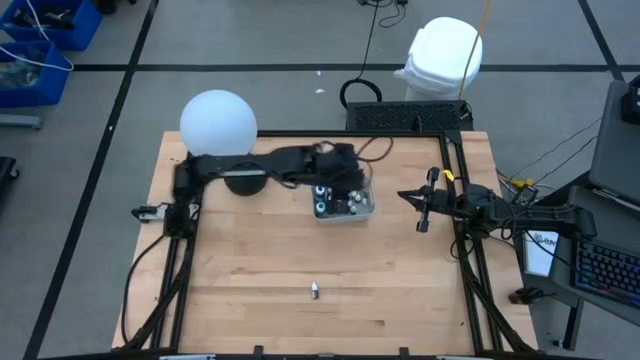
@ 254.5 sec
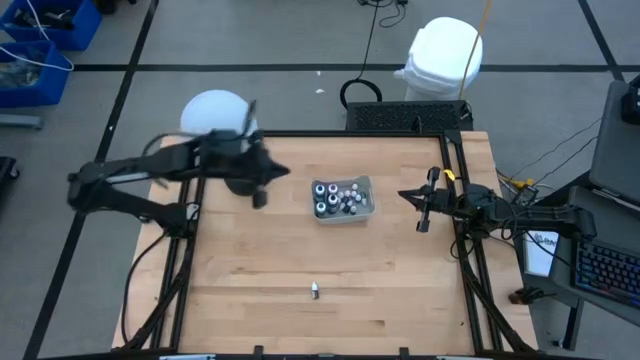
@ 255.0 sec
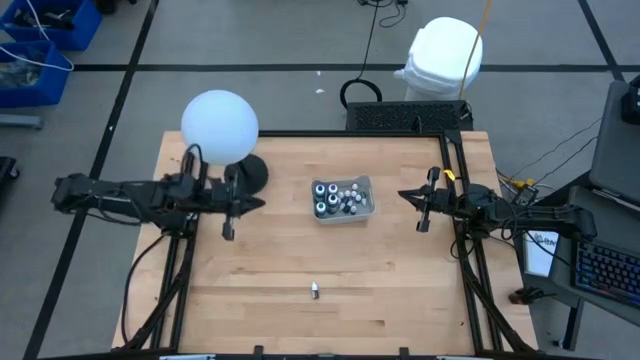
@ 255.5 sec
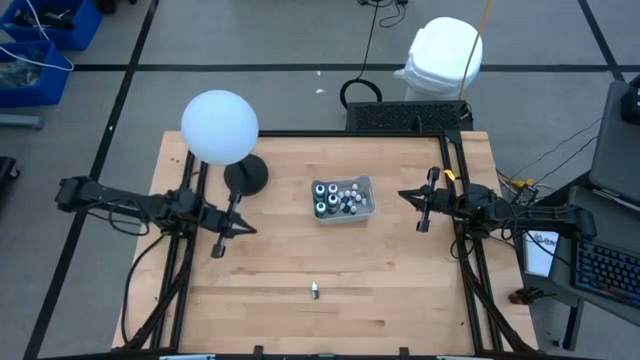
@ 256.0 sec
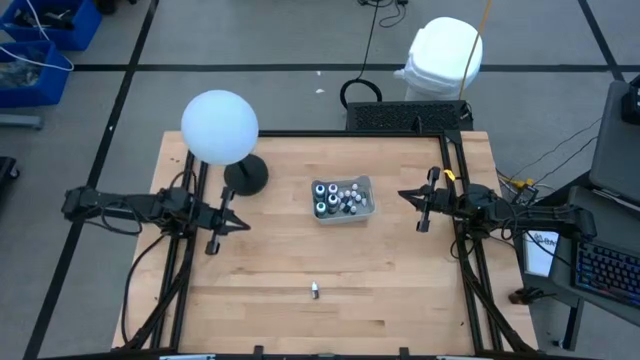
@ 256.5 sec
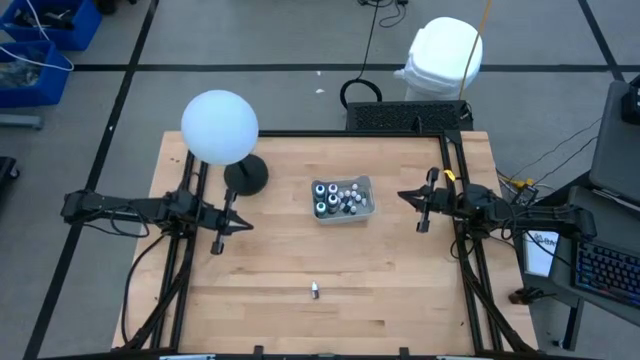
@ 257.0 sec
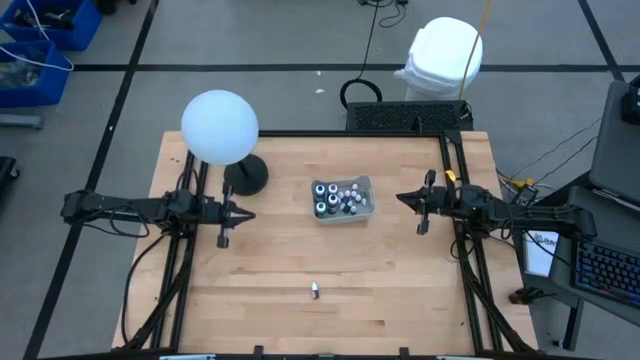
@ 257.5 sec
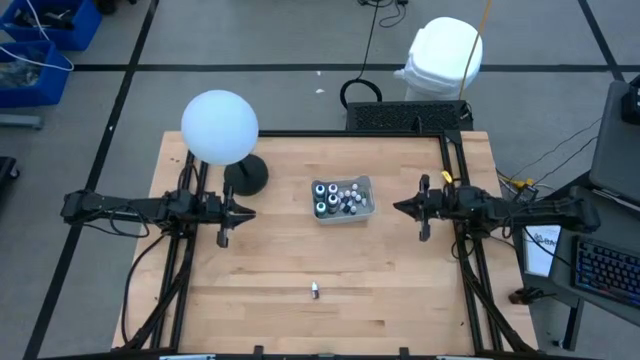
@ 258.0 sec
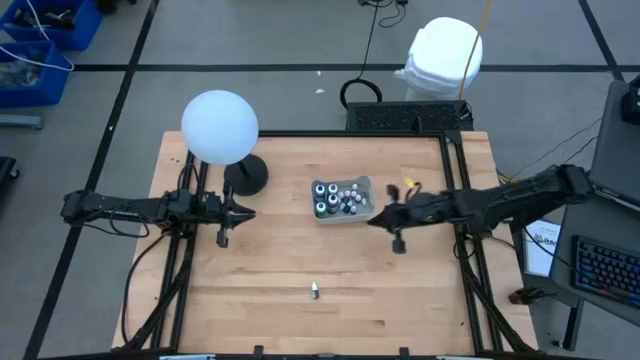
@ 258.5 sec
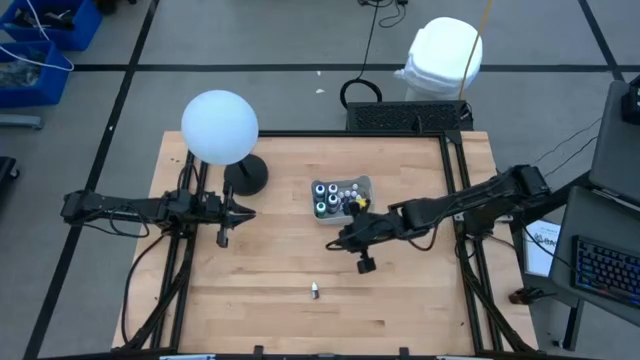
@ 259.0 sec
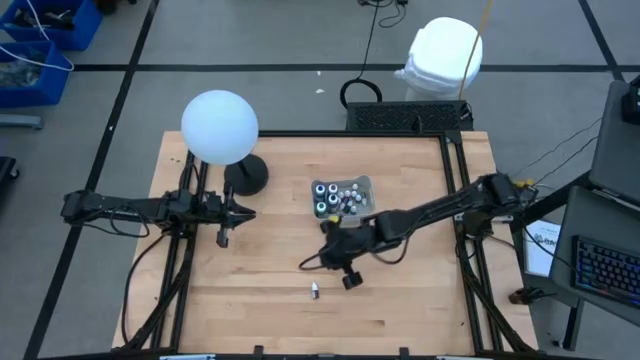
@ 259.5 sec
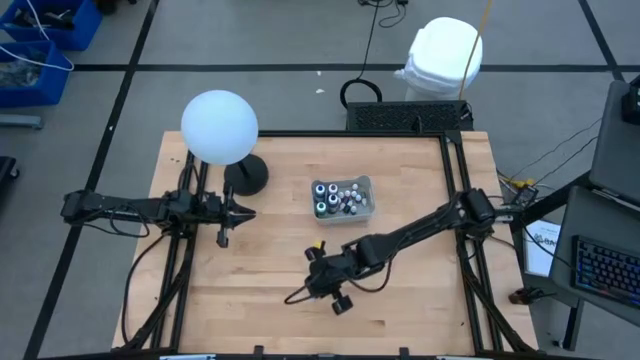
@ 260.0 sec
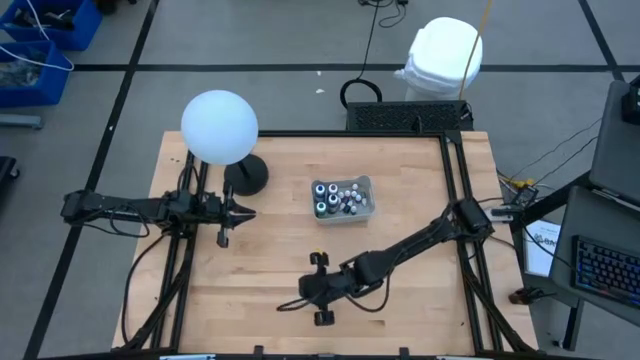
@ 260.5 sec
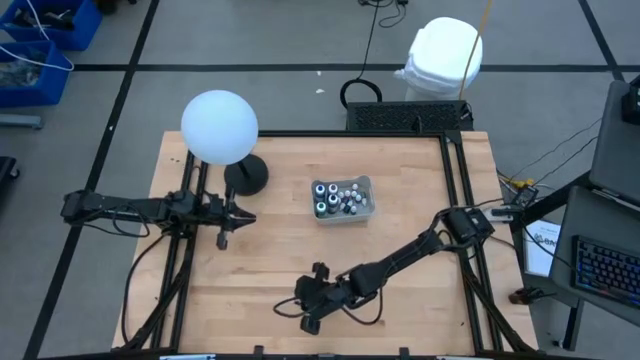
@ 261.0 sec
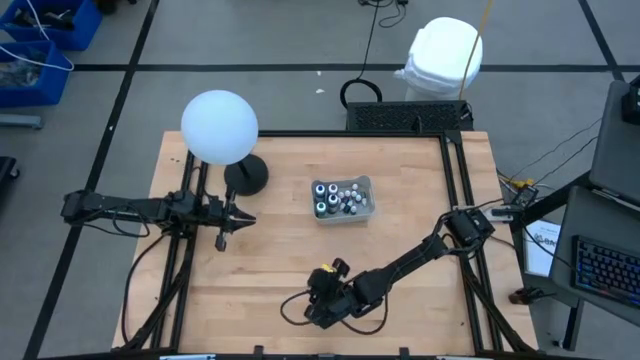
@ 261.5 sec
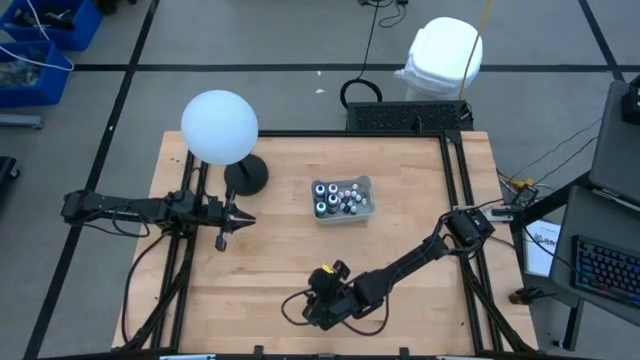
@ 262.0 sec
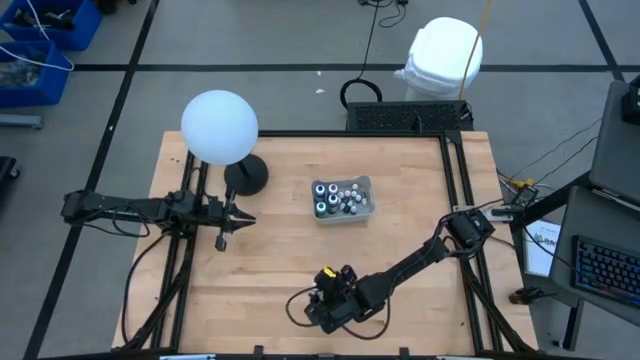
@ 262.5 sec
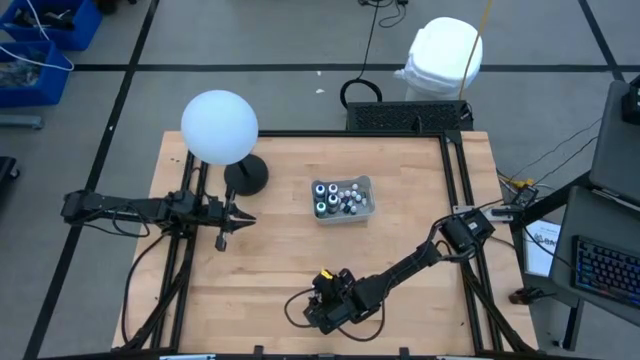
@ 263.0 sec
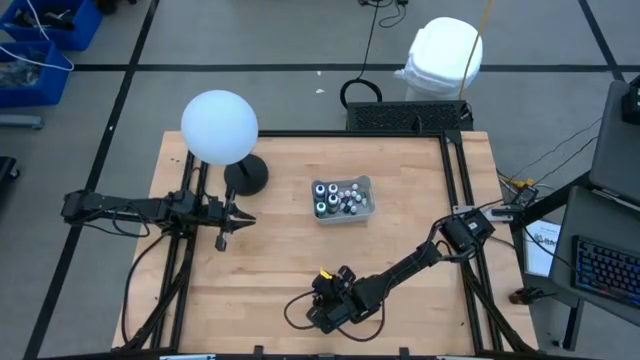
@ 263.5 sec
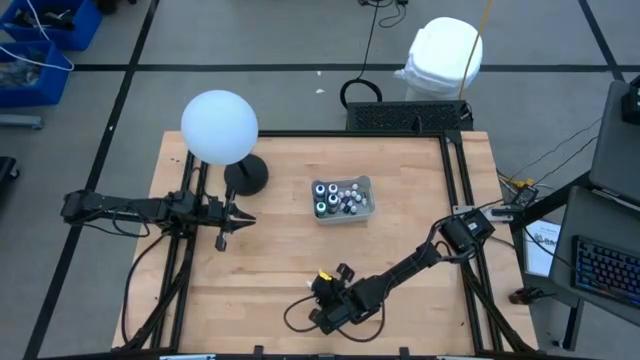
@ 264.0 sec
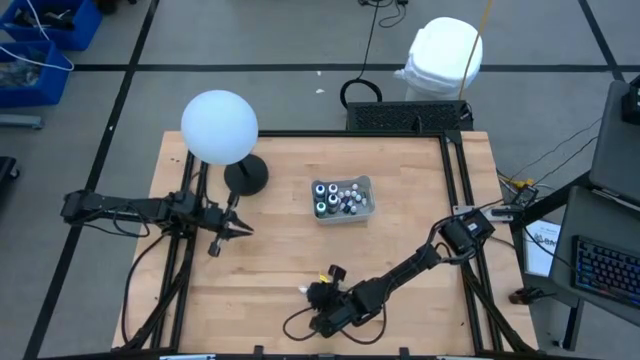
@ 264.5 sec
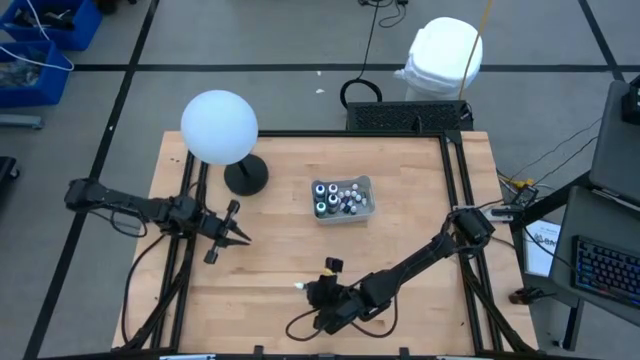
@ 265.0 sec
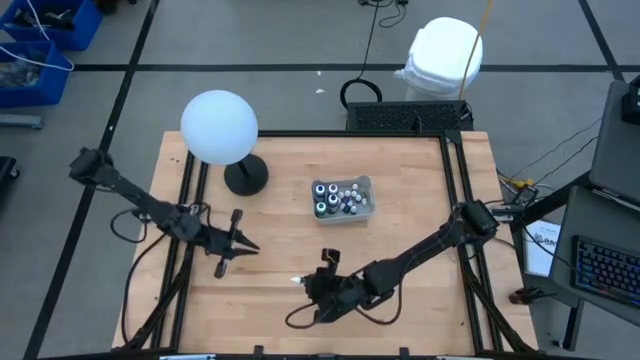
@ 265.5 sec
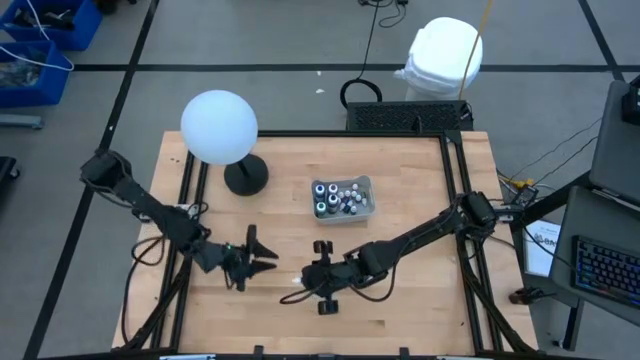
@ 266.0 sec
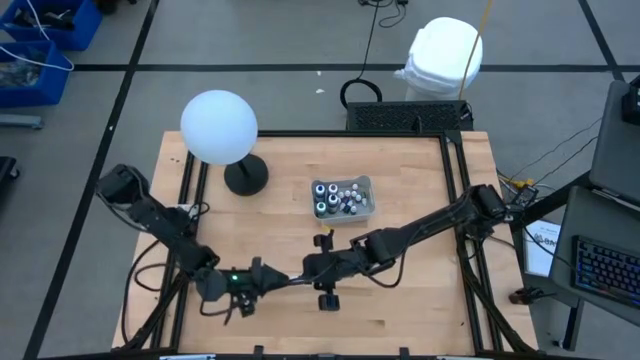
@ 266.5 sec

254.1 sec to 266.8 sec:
Task: Pick & Place food coloring
Put the small red food coloring bottle into the gray bin

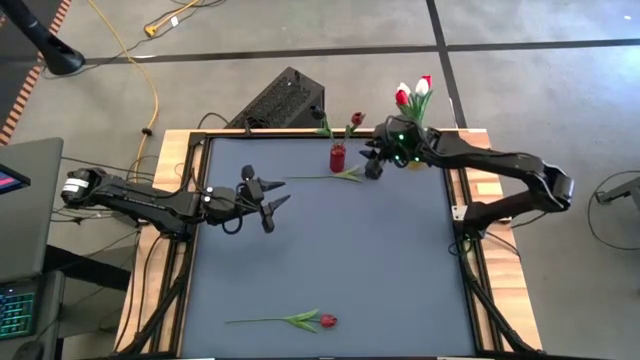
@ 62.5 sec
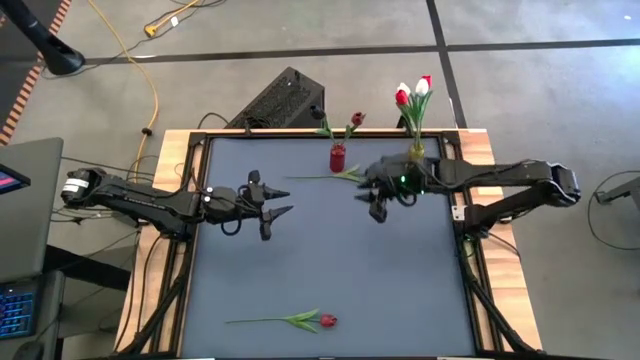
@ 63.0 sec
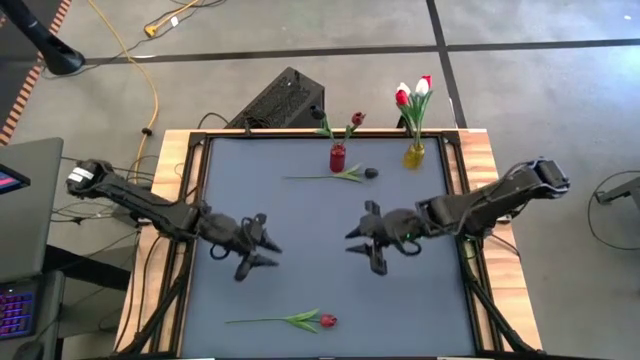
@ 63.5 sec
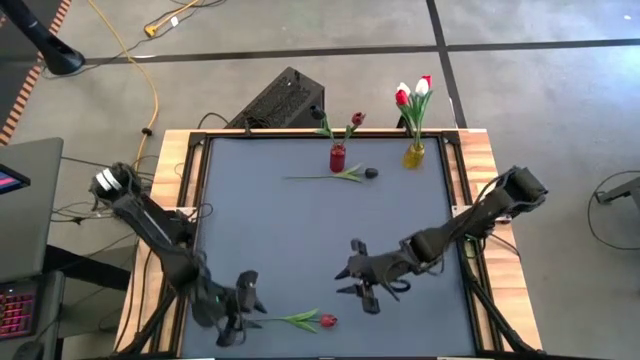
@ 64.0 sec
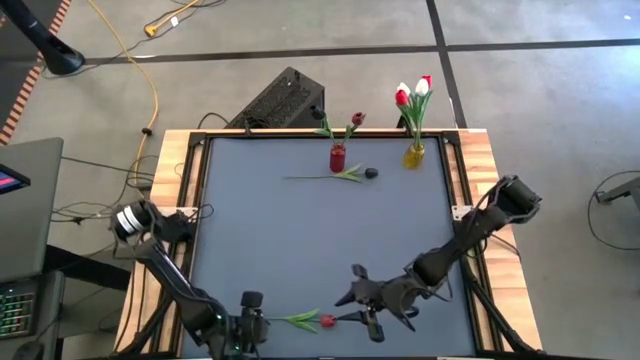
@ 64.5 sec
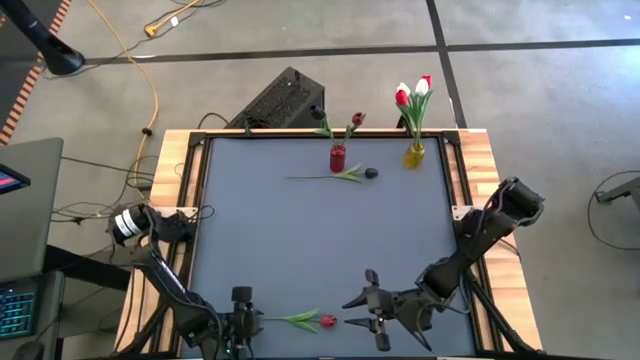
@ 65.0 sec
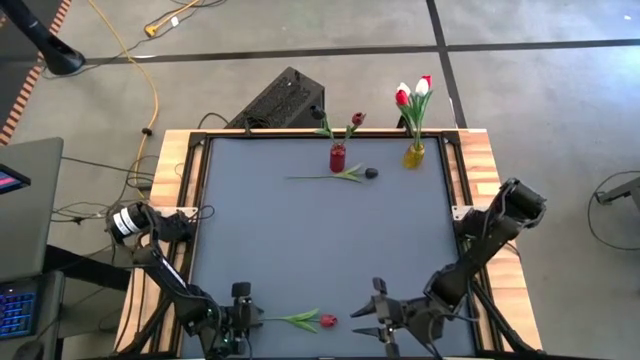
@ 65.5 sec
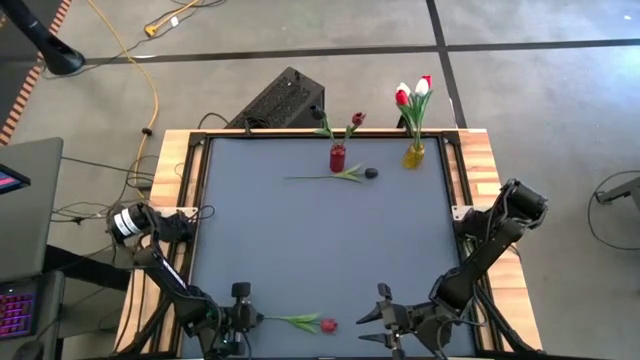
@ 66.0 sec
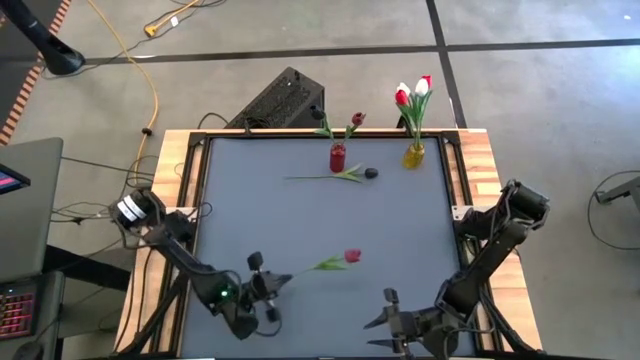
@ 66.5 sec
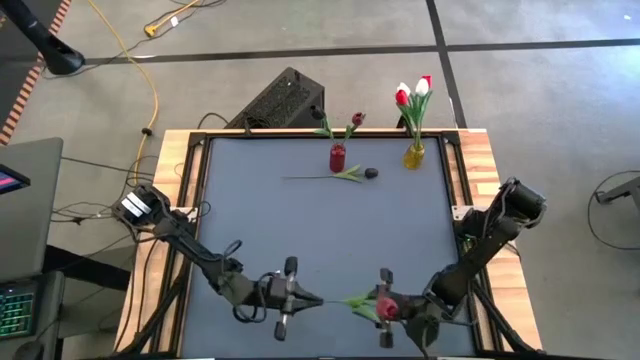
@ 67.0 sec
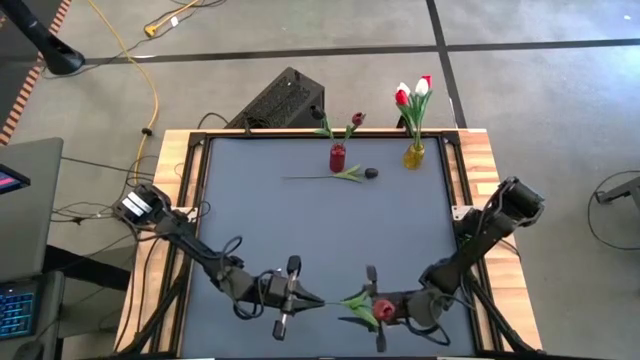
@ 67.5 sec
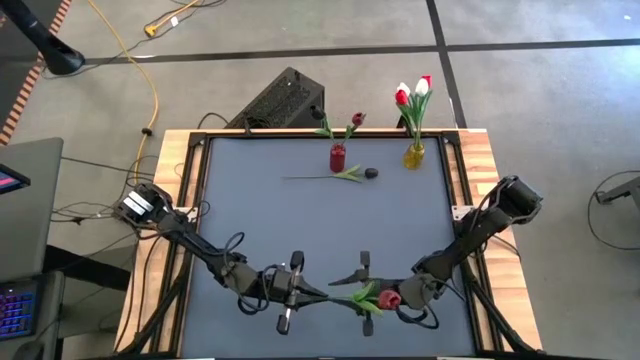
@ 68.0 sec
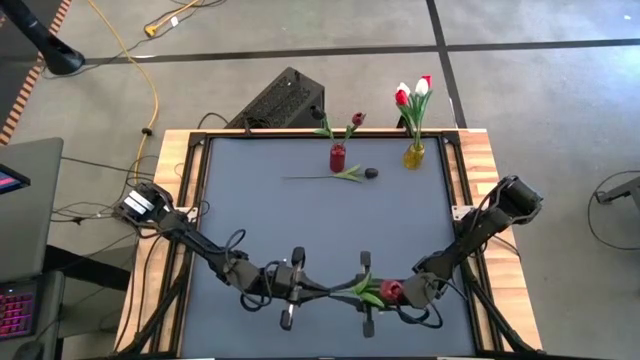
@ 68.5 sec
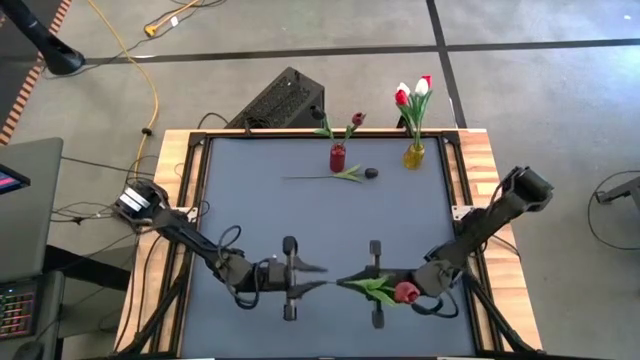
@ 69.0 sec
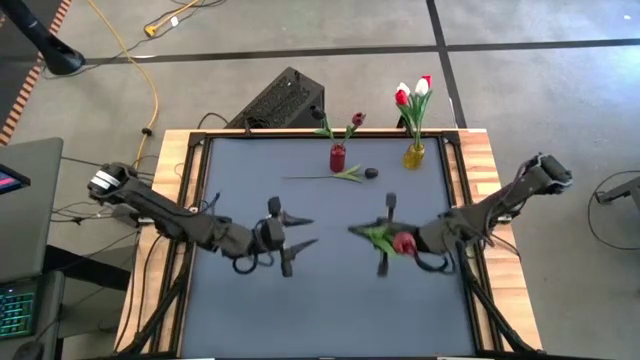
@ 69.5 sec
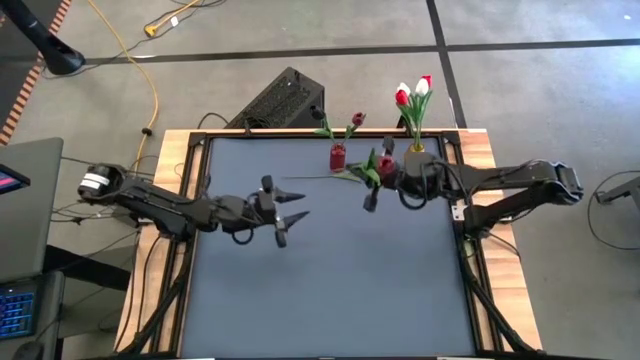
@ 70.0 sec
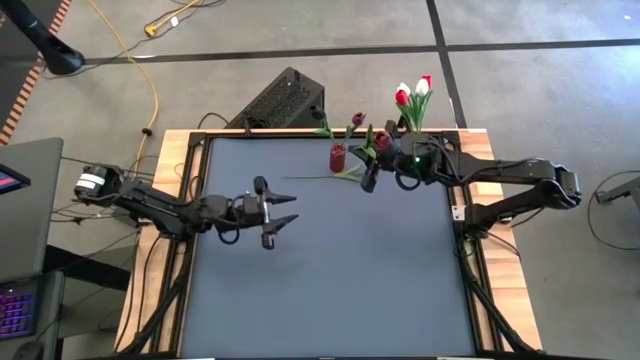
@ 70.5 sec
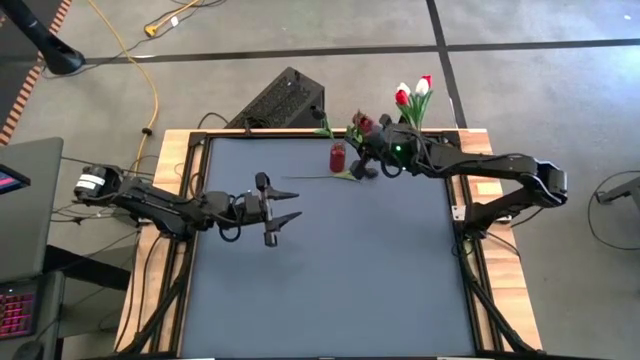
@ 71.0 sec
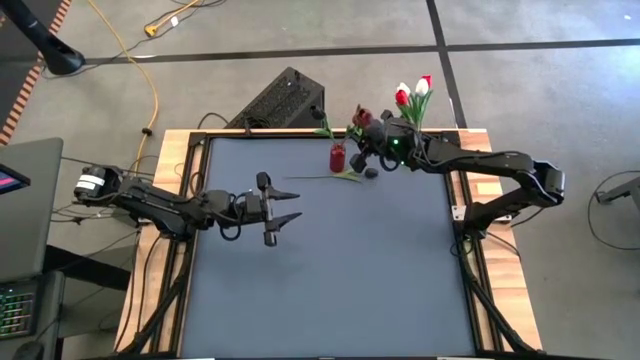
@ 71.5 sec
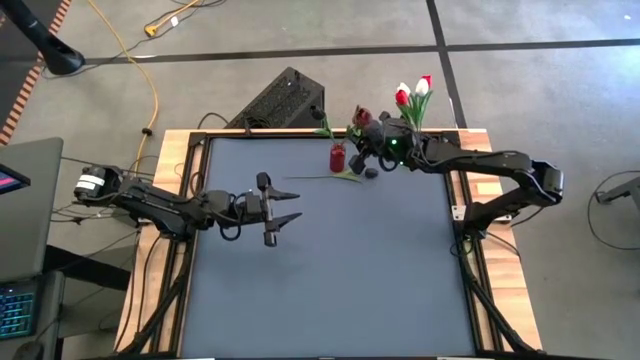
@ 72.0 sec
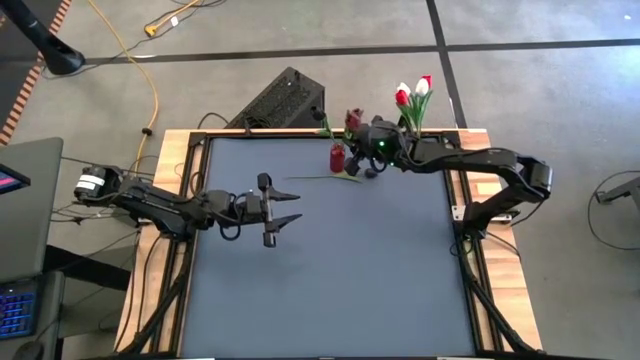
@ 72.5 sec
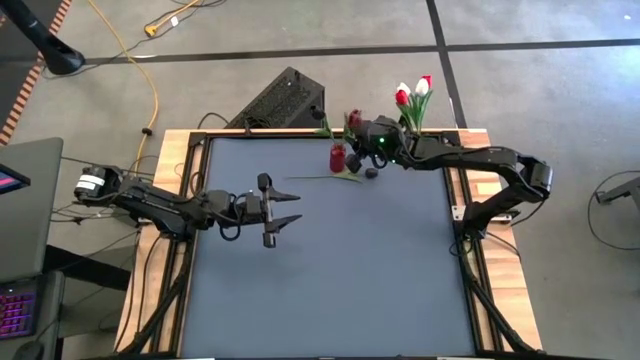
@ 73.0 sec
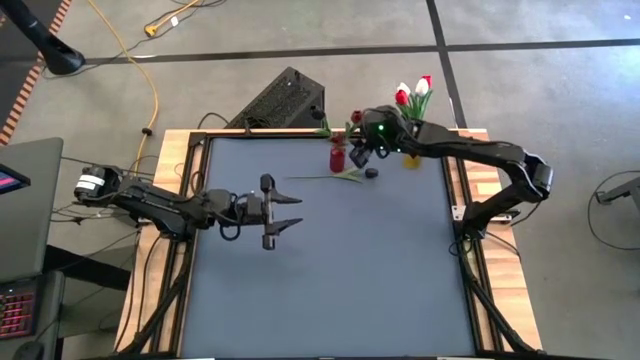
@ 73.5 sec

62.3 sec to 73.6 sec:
Task: Sort flowers into vase by color
Put the dark red tulip into the red vase
